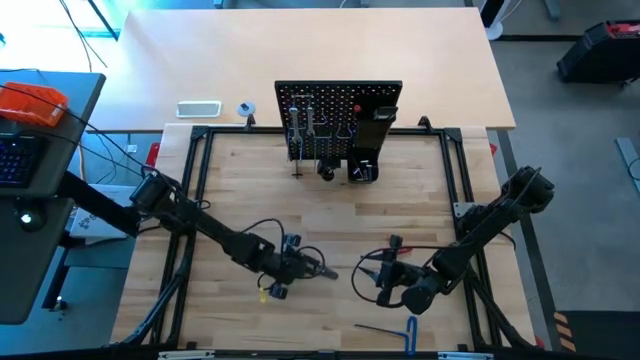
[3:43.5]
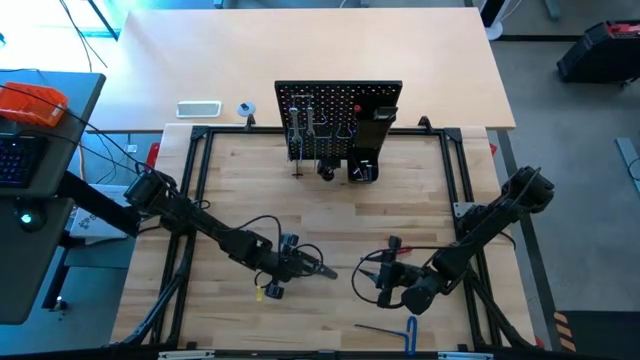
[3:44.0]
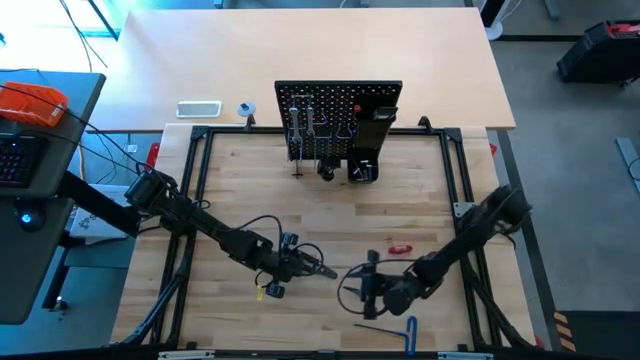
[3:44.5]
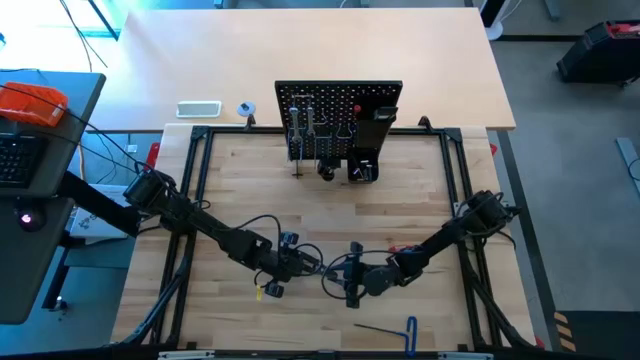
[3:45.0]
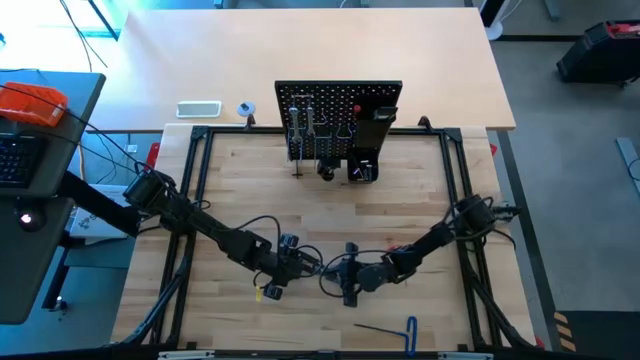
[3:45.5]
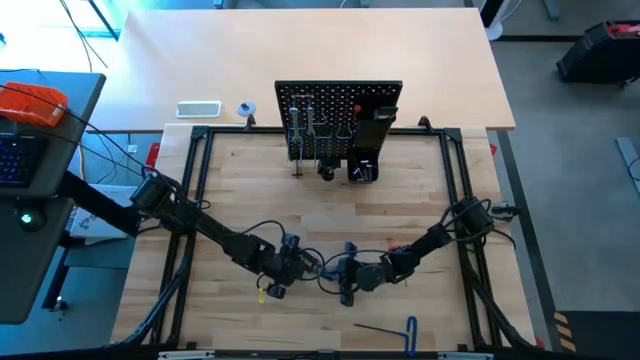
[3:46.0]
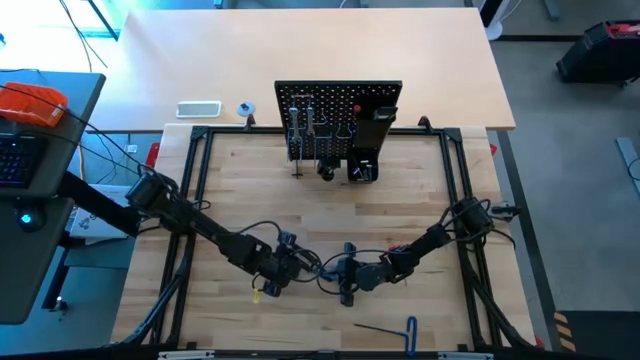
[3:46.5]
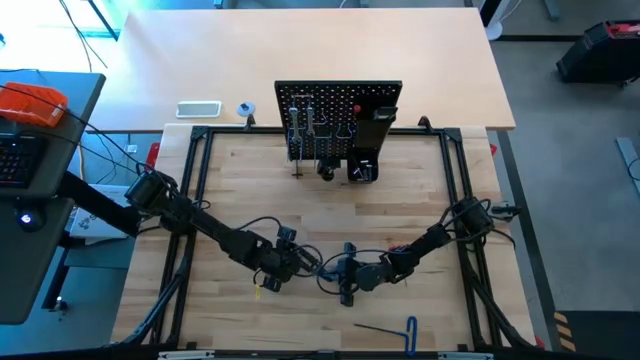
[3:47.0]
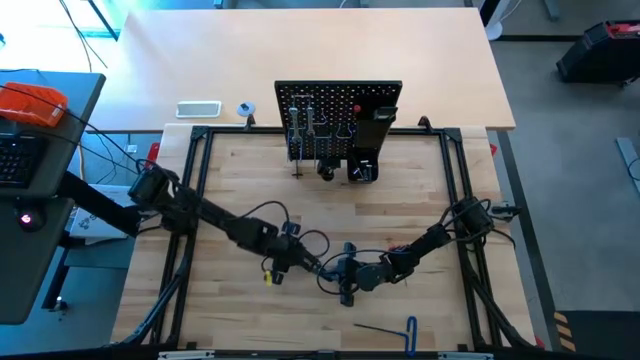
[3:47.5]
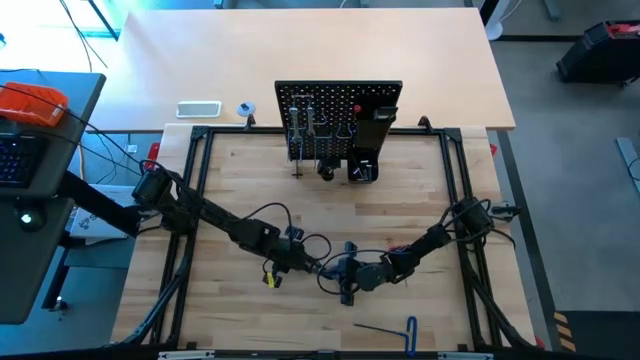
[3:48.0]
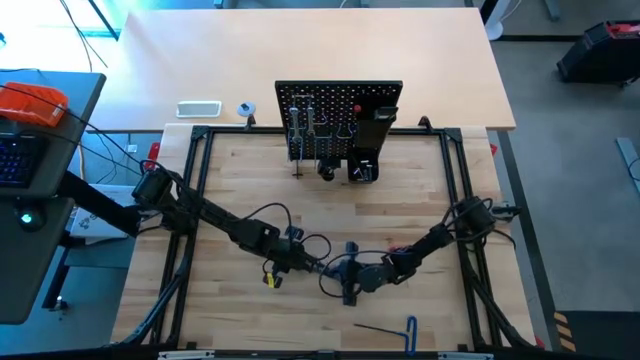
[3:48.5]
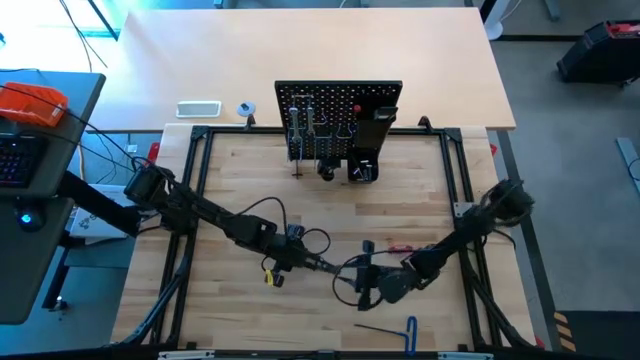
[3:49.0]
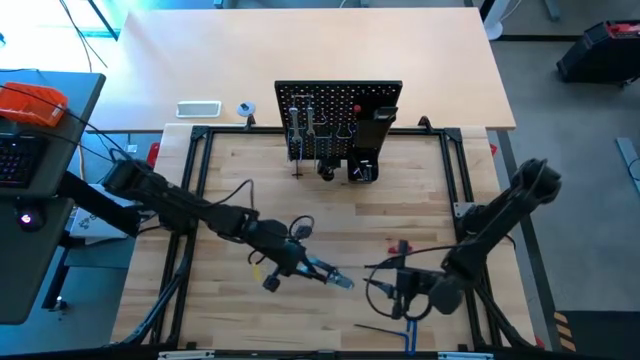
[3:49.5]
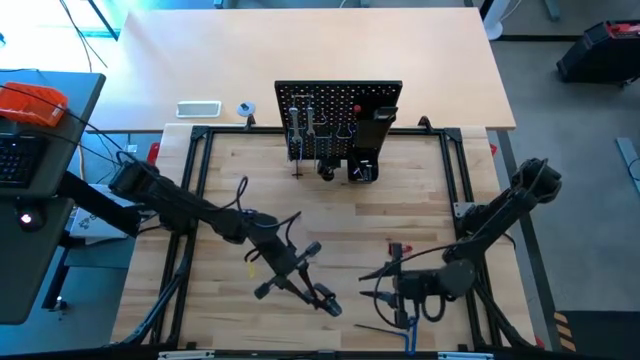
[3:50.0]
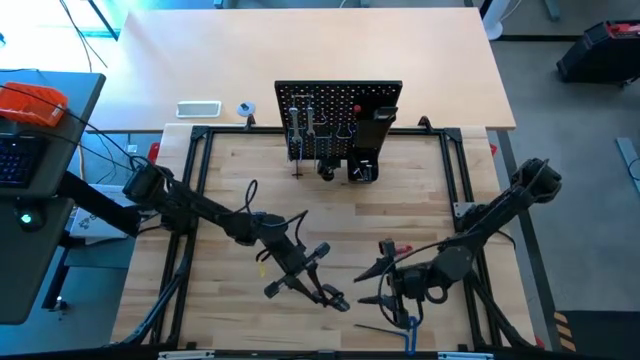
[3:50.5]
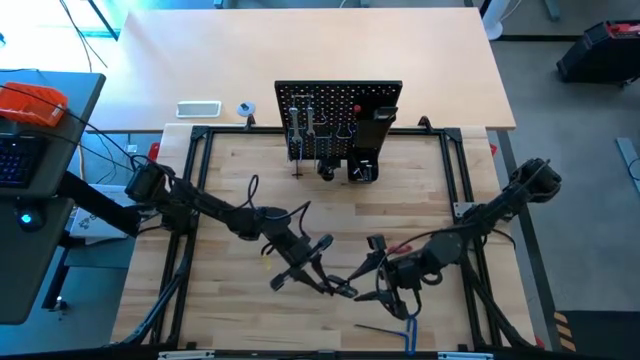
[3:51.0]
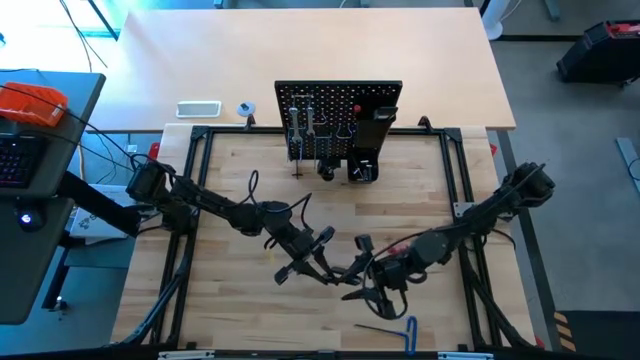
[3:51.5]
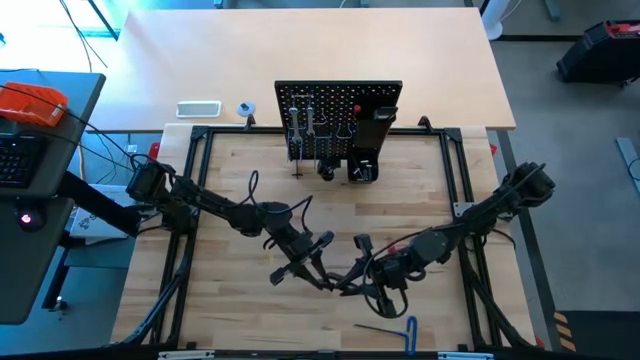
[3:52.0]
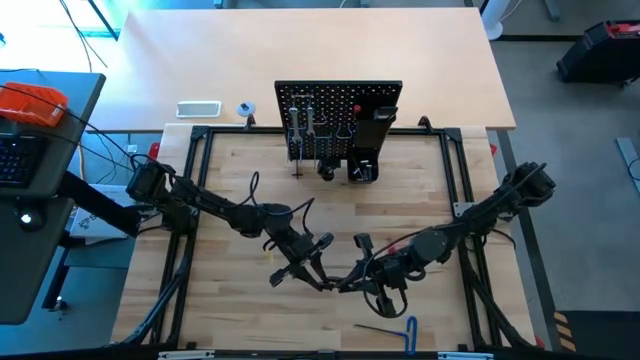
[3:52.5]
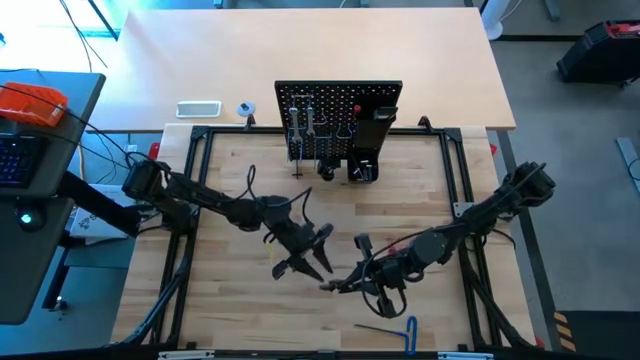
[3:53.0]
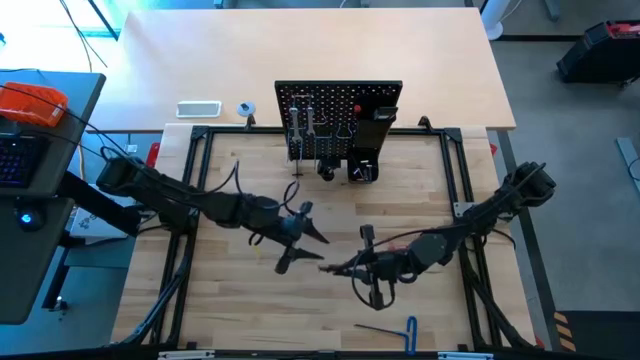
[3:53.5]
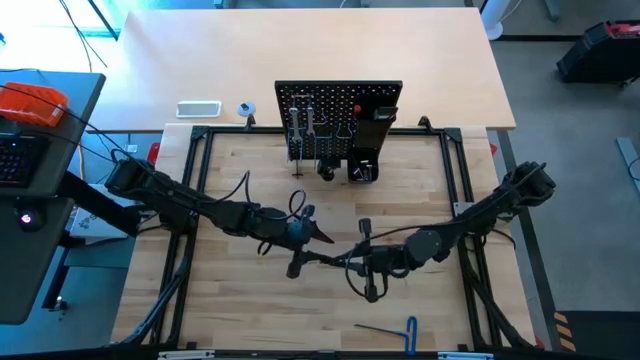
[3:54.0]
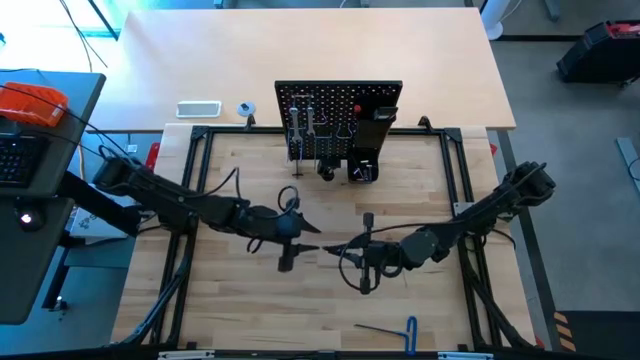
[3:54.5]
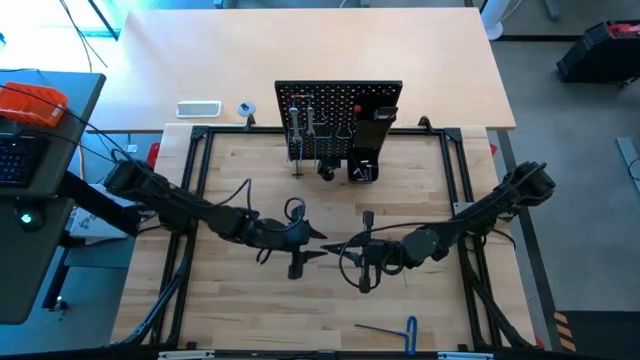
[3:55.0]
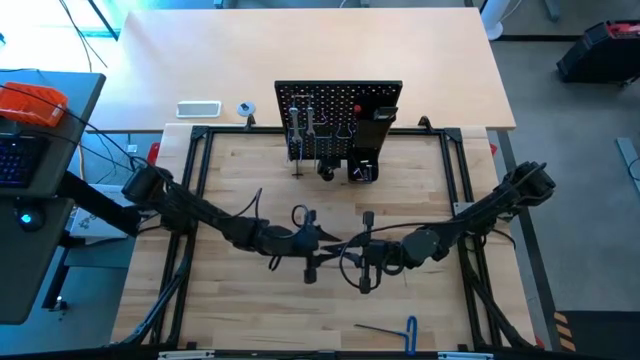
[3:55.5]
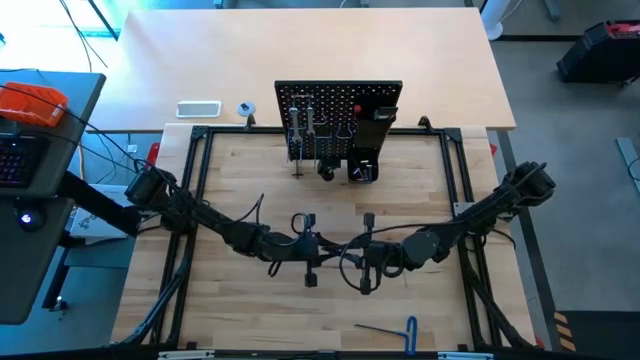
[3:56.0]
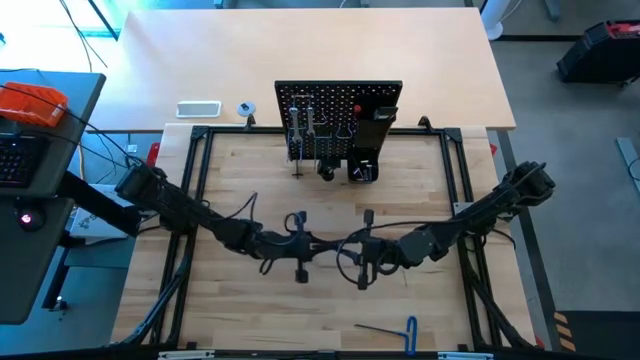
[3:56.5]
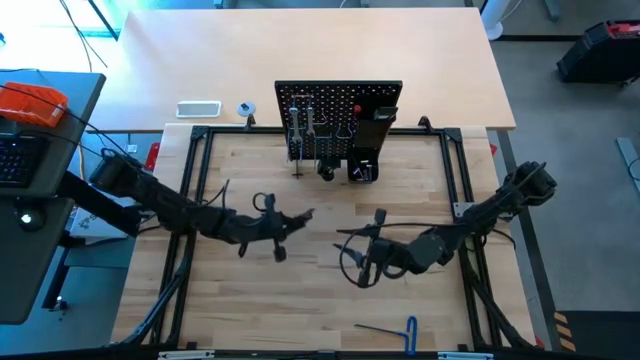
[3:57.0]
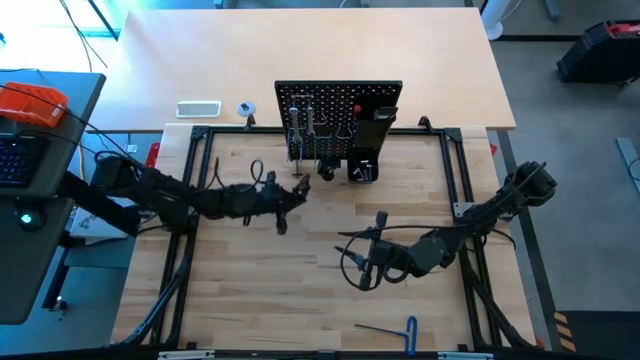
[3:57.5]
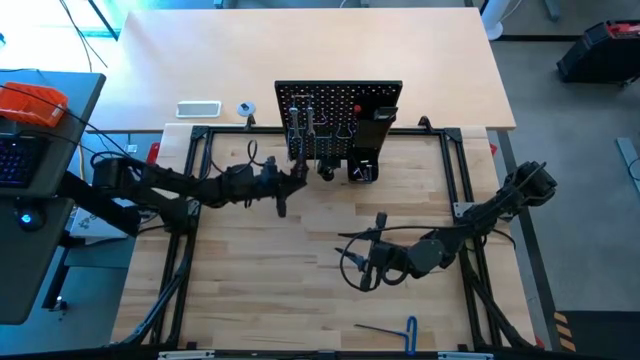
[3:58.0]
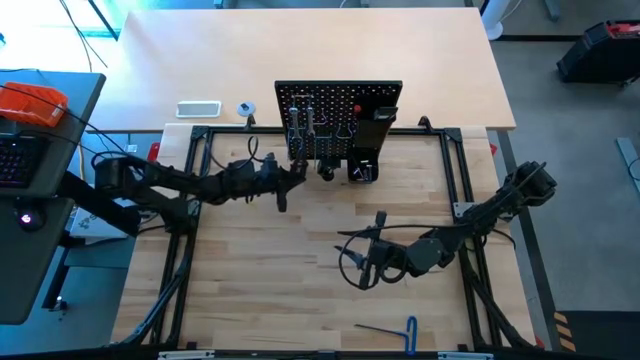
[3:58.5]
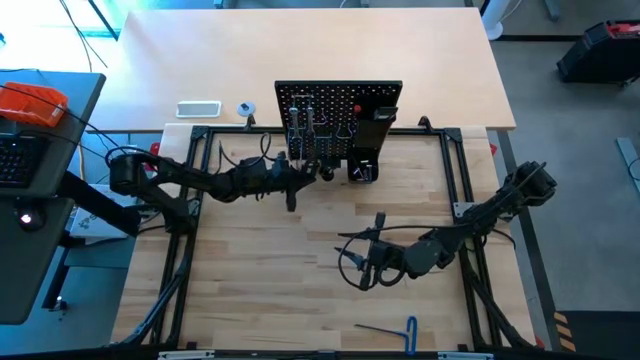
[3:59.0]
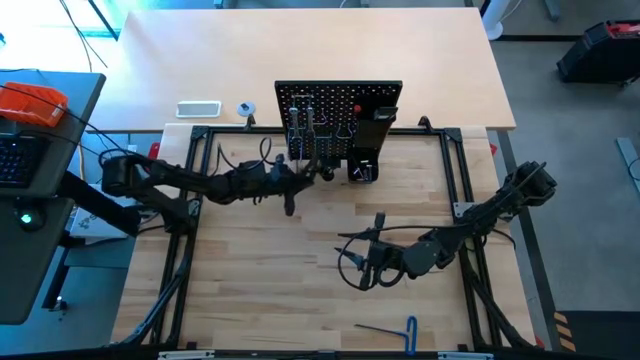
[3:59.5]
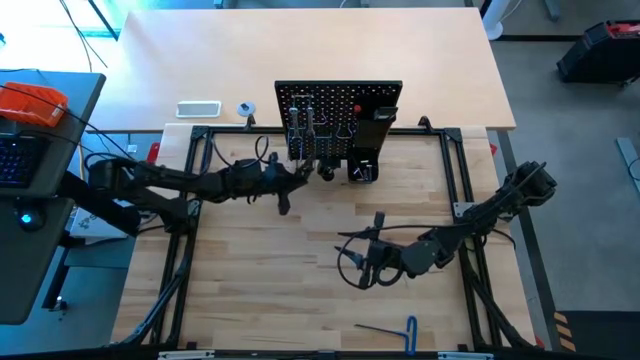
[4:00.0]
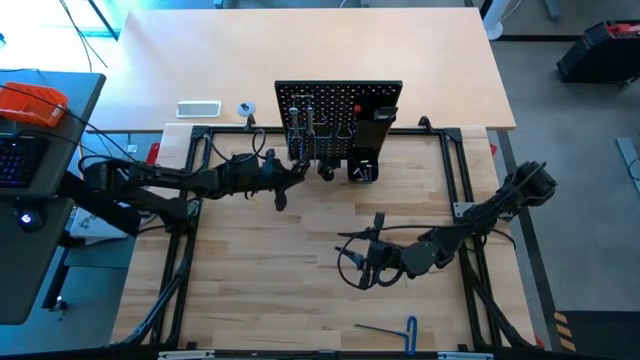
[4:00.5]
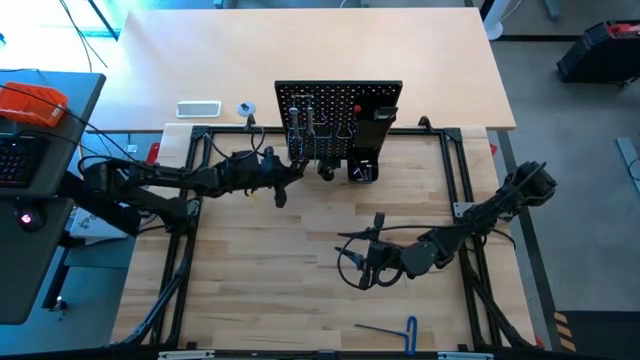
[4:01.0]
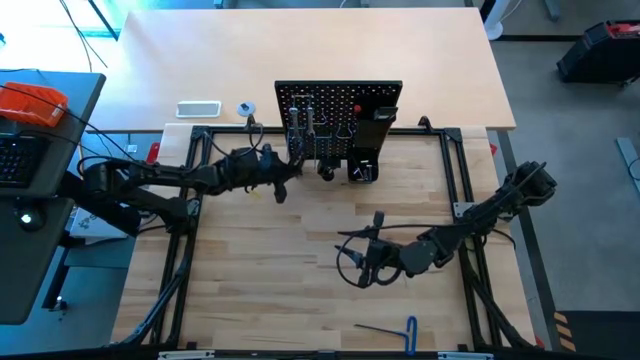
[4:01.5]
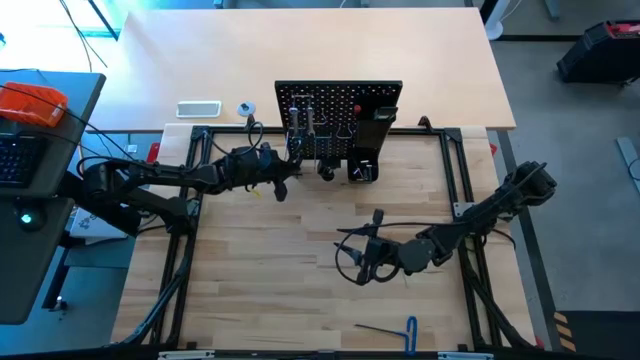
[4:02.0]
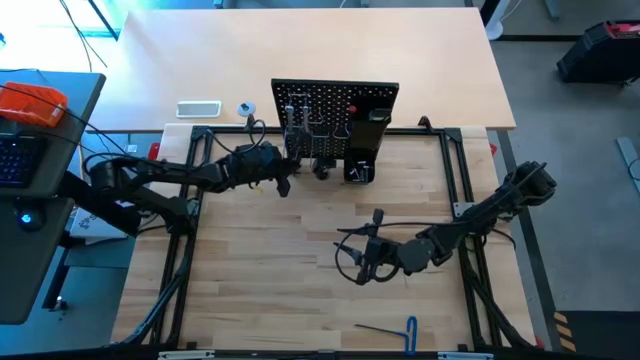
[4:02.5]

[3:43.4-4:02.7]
Task: Hang tools onto peg board
Hang the black wire cutter onto the peg board

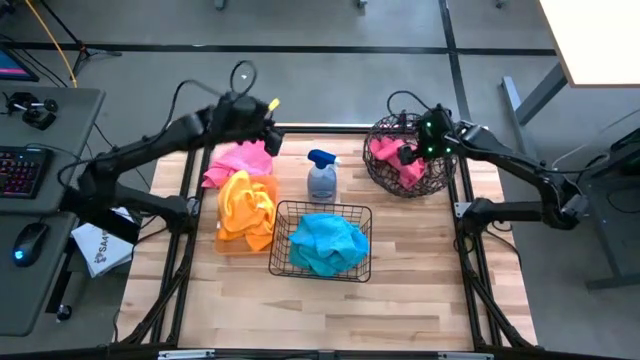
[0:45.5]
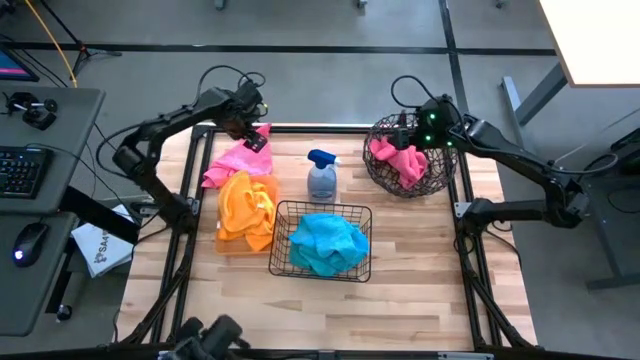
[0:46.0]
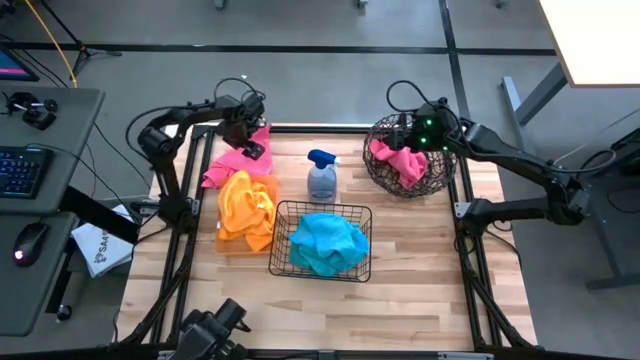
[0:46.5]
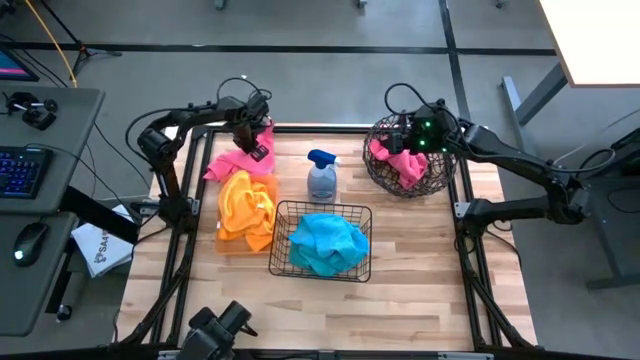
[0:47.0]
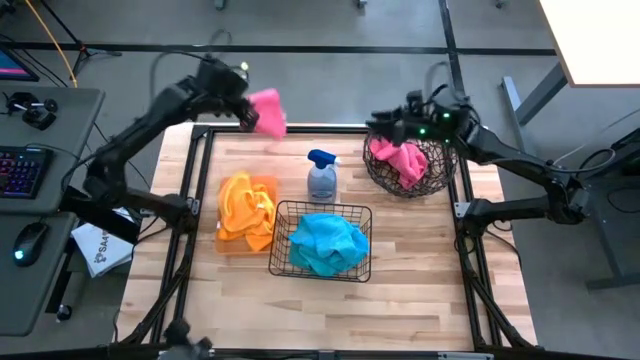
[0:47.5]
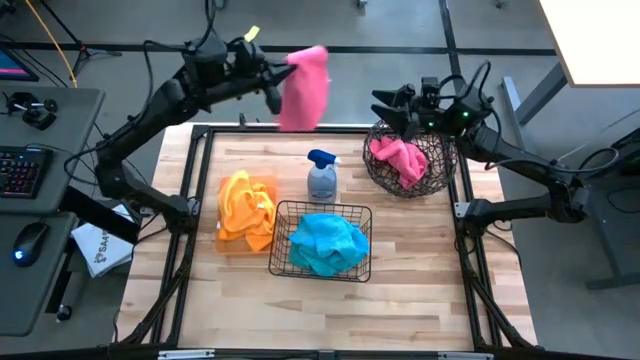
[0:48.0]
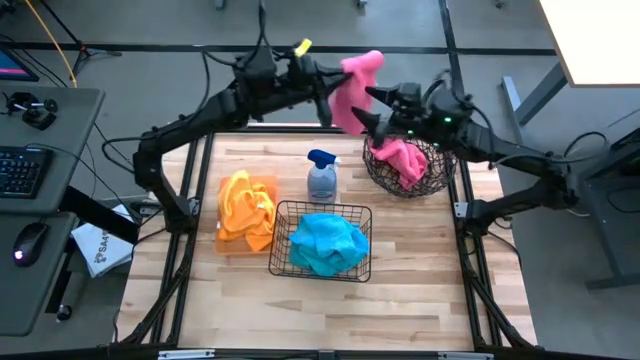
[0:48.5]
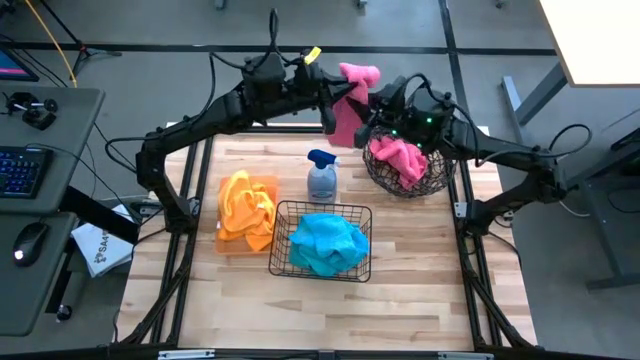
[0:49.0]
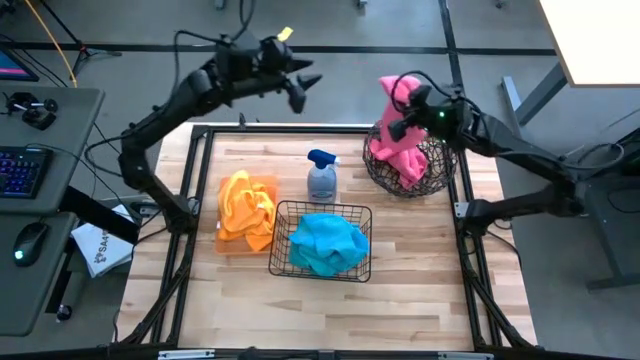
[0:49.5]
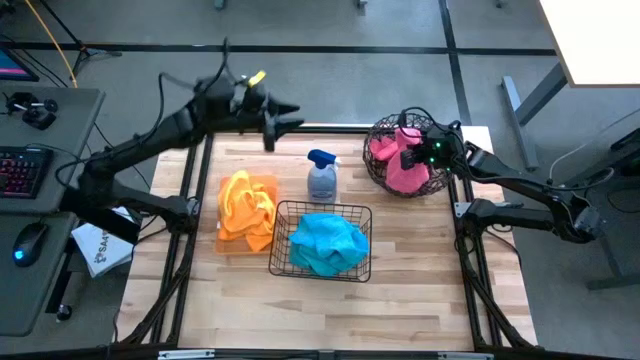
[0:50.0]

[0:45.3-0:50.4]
Task: Sort microfiber towel by color & place in baskets
Put the pink towel into the top basket
